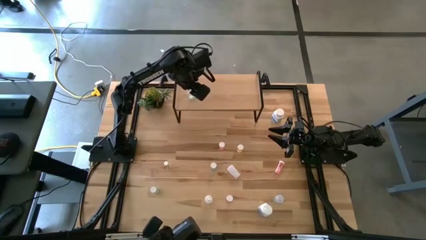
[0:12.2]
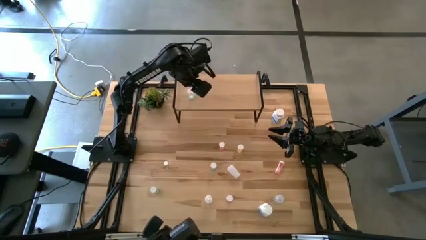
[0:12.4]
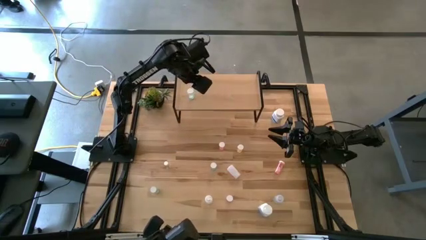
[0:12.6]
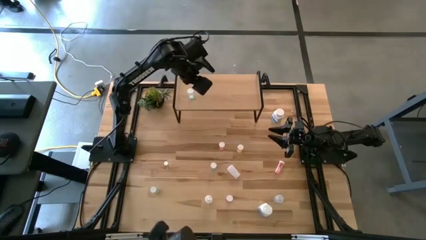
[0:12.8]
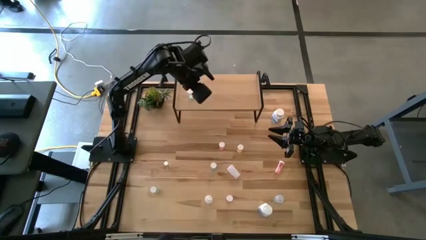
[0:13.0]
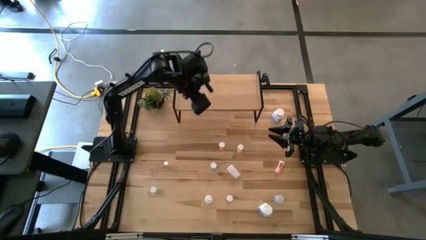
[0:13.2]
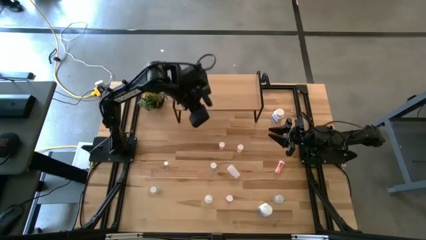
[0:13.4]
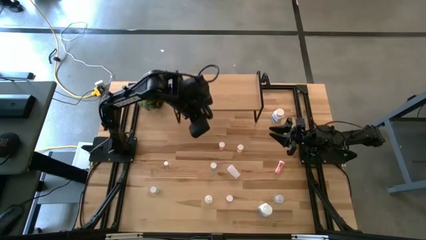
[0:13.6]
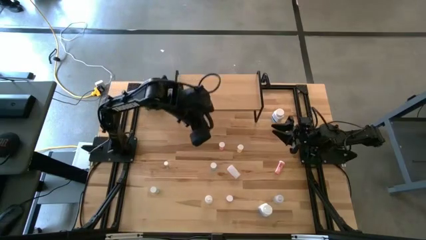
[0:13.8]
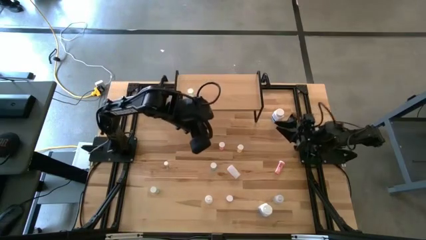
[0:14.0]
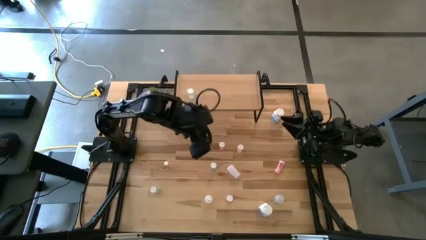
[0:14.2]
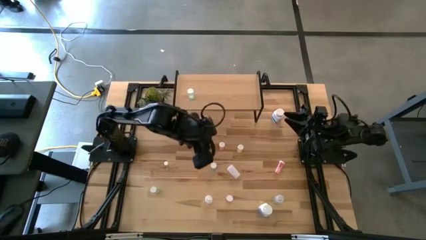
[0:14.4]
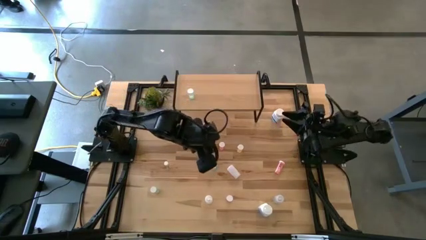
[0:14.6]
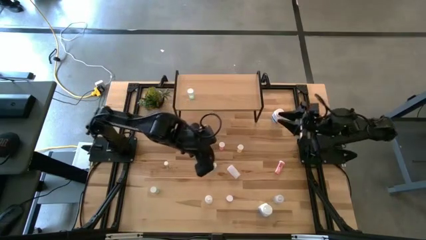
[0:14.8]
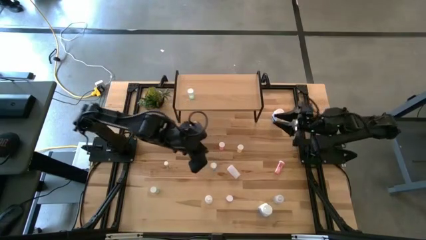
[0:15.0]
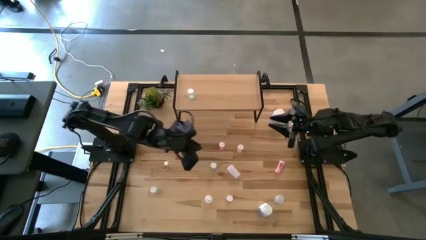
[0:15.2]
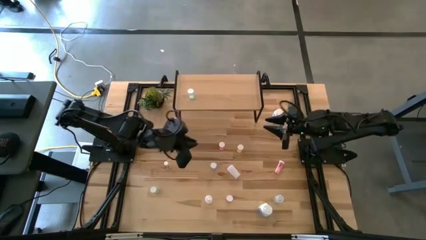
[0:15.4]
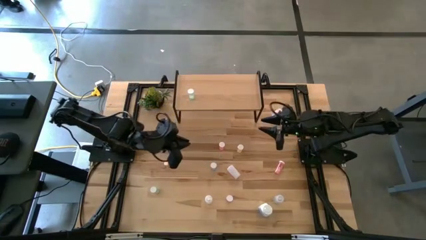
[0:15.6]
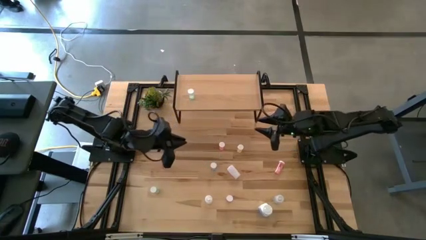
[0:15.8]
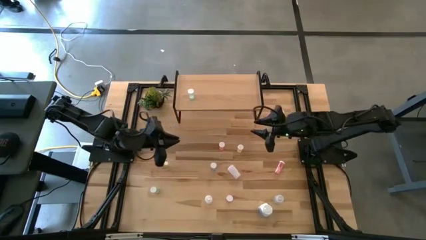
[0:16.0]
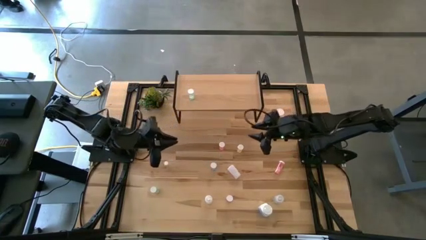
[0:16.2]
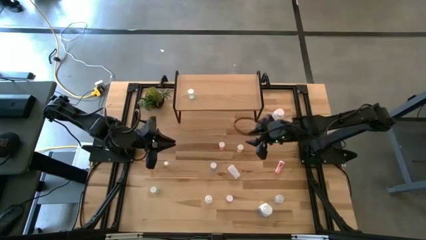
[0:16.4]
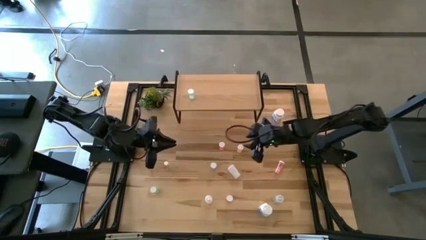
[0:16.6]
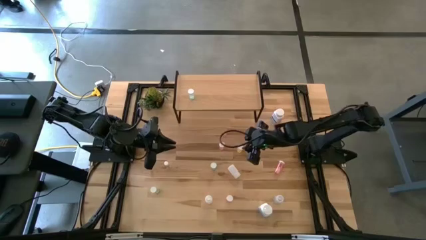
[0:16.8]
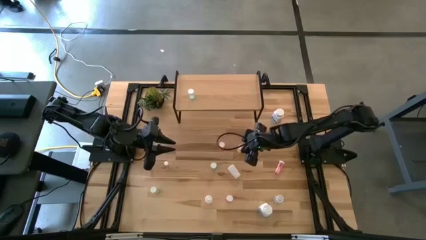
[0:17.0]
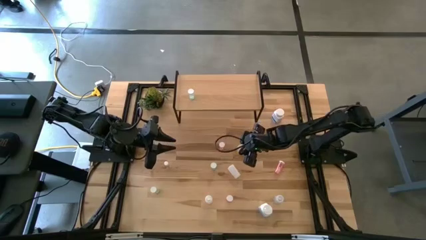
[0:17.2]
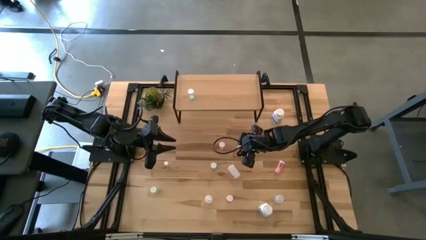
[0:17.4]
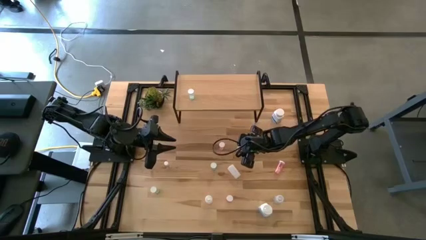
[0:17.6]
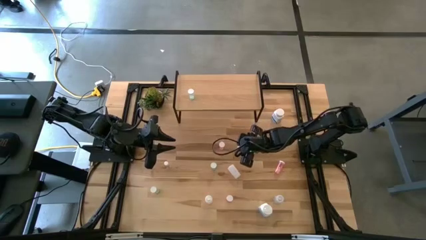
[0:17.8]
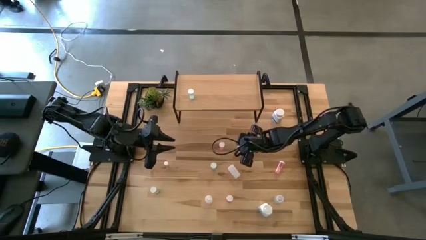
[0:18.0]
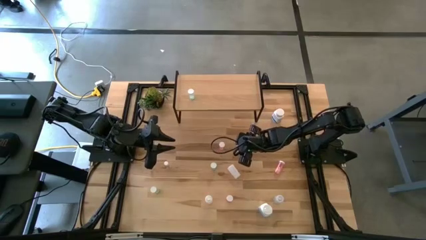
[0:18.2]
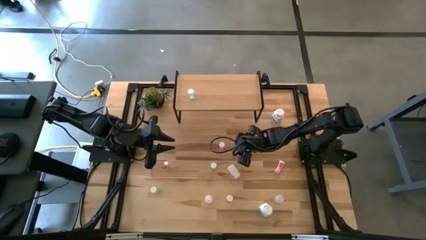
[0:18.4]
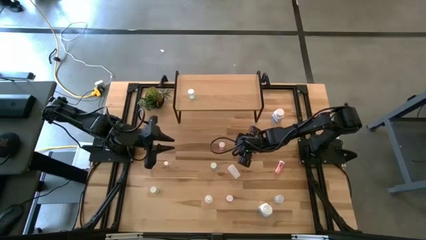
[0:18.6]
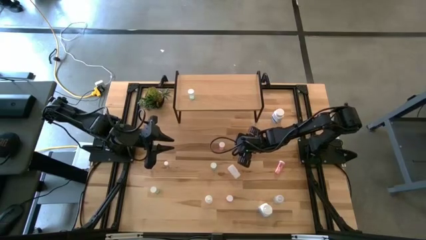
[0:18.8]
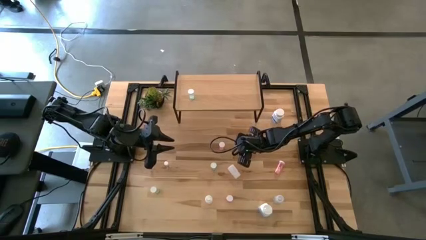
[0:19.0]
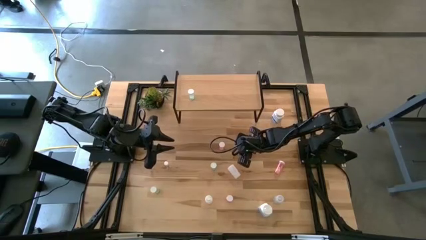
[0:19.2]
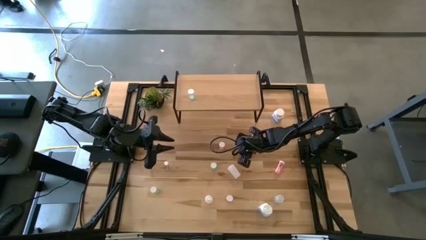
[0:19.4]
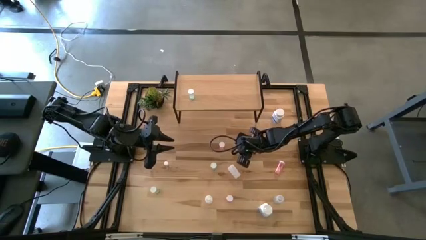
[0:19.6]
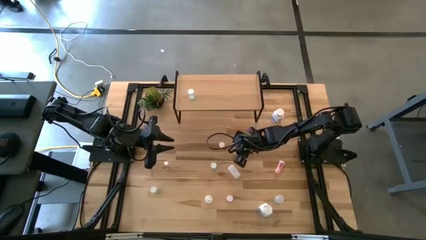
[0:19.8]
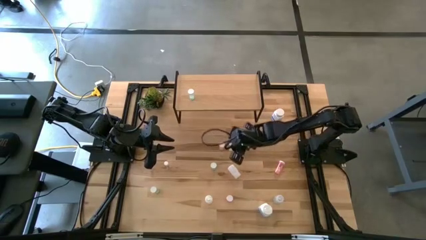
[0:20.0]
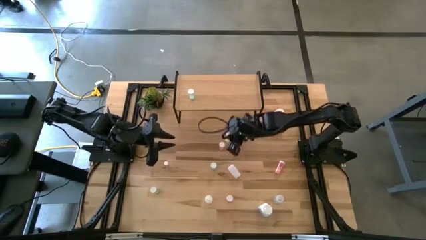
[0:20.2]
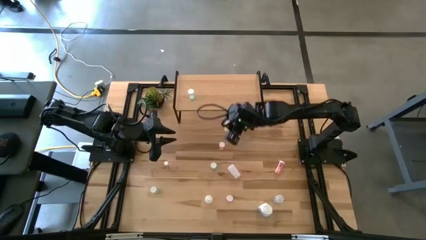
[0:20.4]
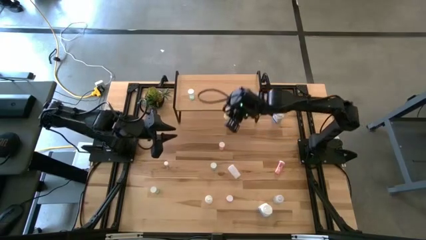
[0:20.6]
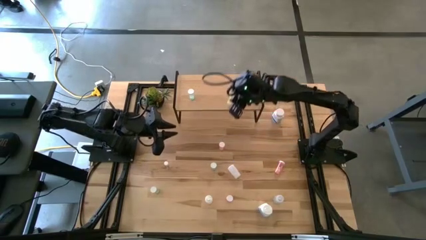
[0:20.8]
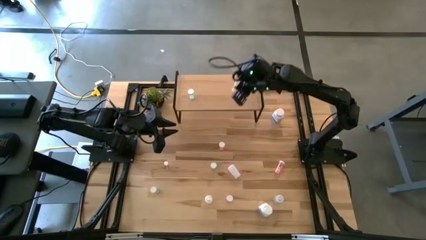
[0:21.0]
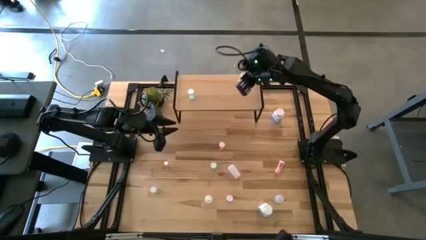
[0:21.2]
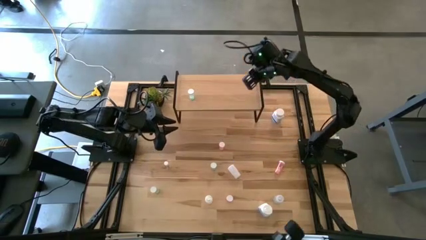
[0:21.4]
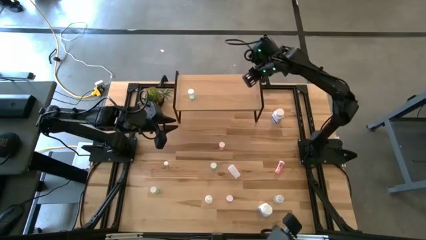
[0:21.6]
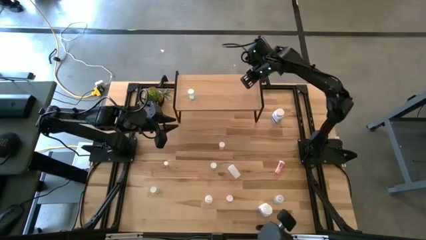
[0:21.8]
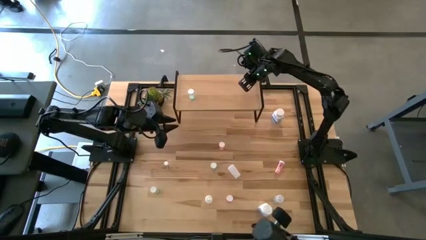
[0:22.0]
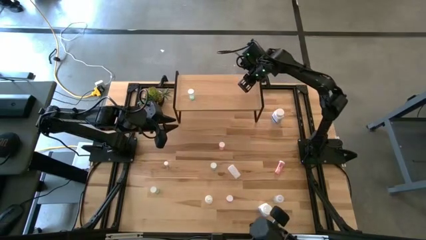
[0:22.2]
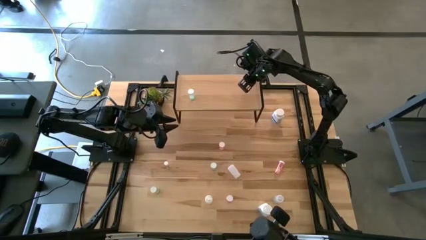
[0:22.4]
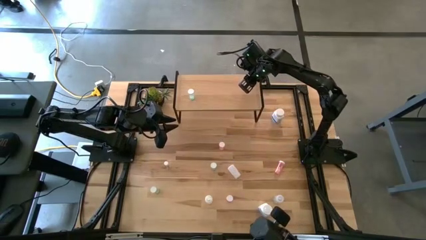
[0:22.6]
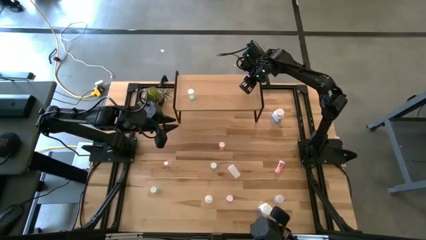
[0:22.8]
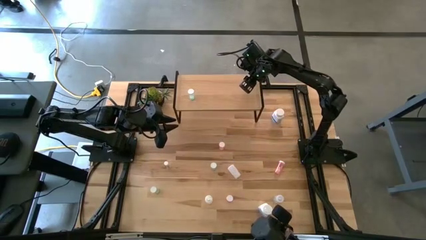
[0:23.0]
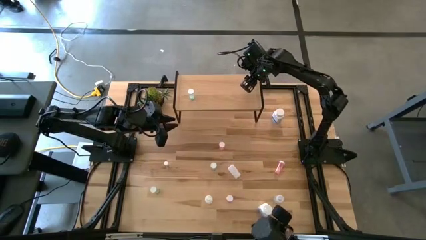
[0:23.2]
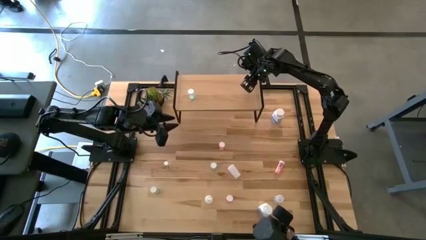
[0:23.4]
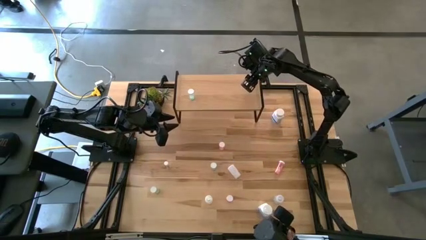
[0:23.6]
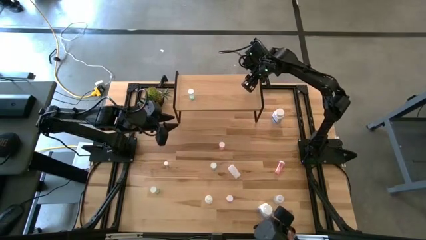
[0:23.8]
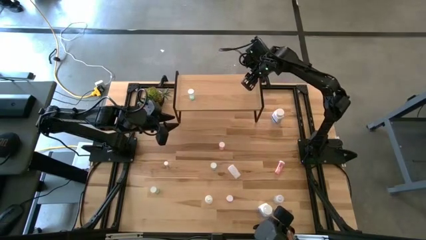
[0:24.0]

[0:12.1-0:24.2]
Task: Pick and place medicine bottles onto shelf by color
Put the yellow pill bottle on the shelf

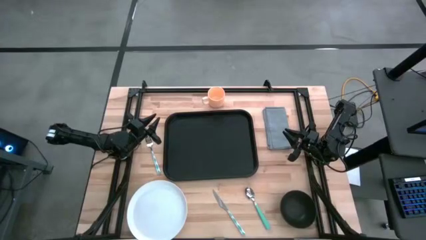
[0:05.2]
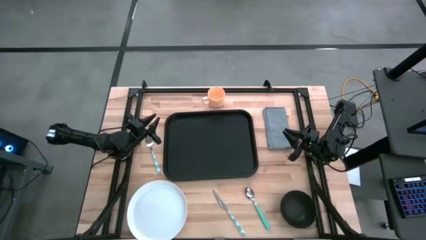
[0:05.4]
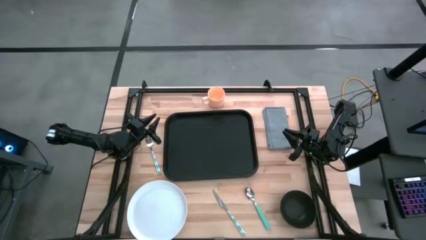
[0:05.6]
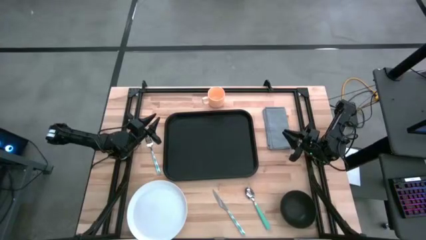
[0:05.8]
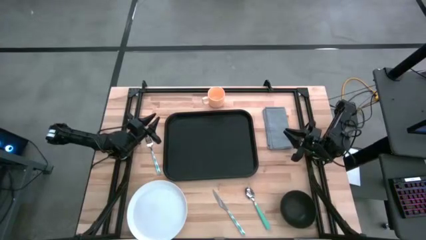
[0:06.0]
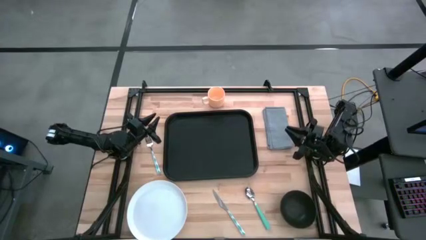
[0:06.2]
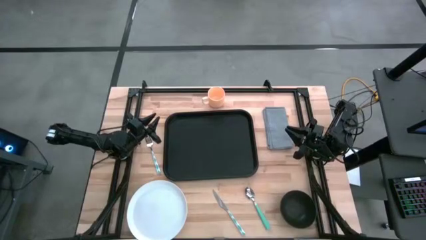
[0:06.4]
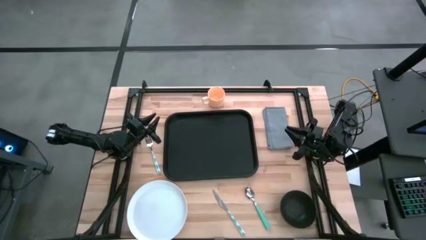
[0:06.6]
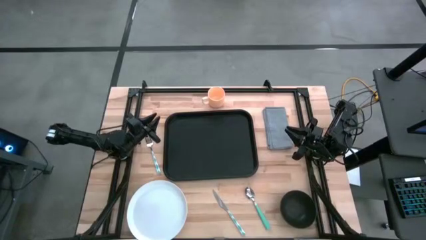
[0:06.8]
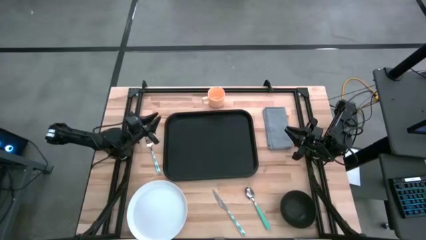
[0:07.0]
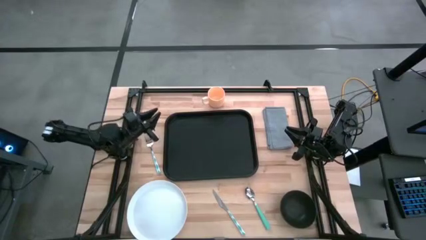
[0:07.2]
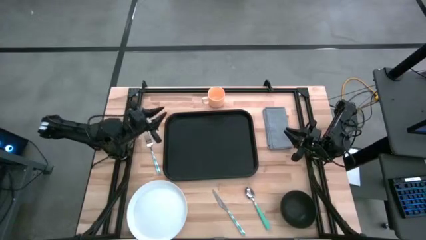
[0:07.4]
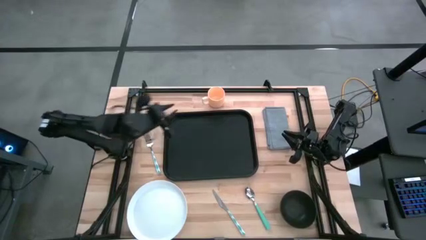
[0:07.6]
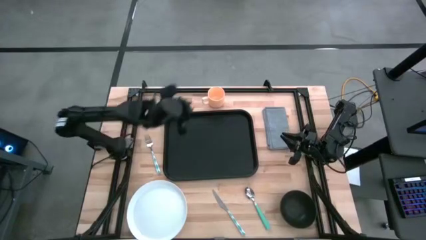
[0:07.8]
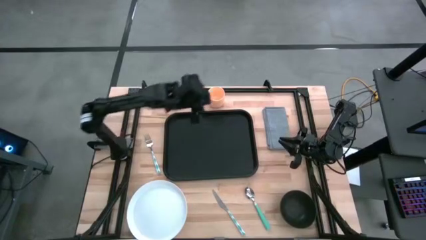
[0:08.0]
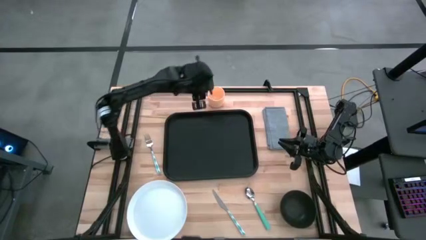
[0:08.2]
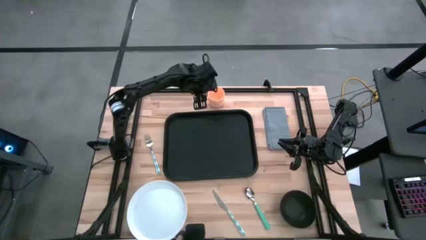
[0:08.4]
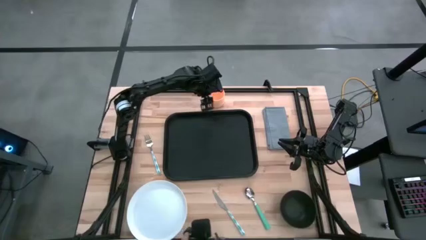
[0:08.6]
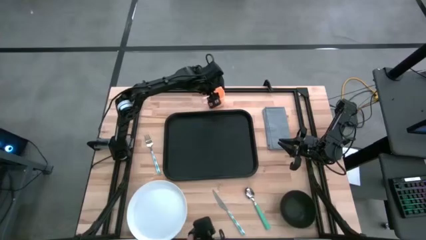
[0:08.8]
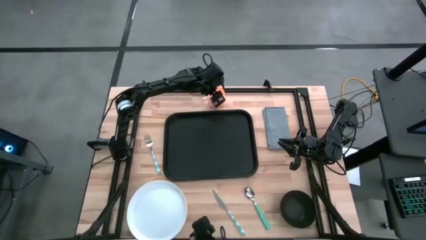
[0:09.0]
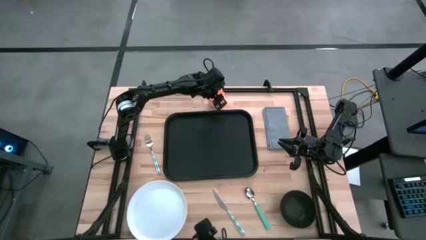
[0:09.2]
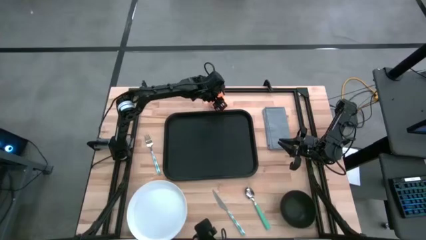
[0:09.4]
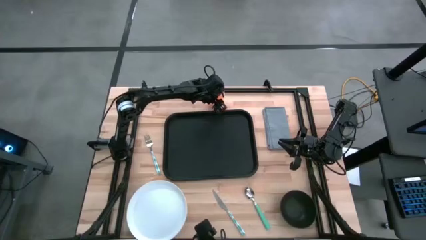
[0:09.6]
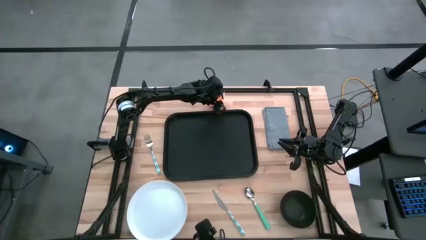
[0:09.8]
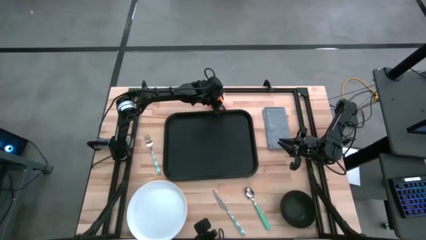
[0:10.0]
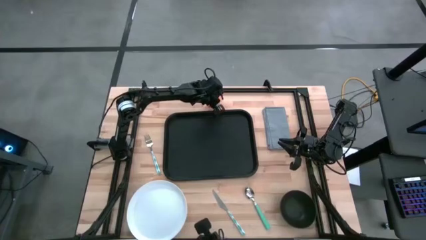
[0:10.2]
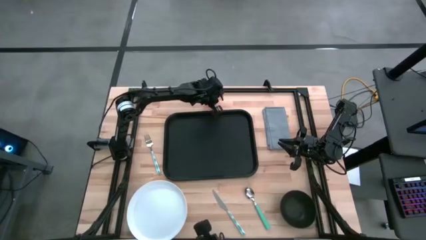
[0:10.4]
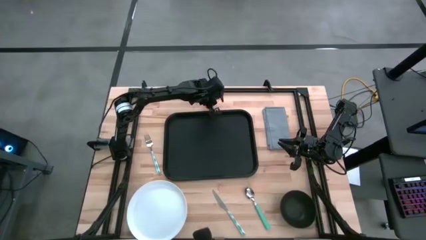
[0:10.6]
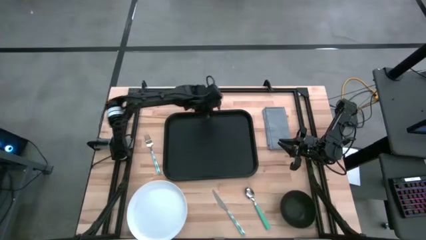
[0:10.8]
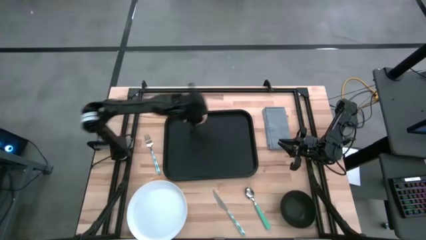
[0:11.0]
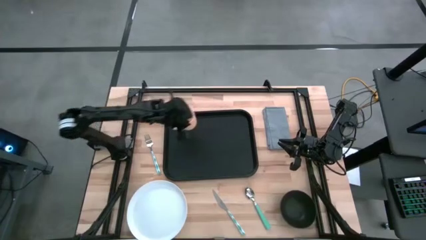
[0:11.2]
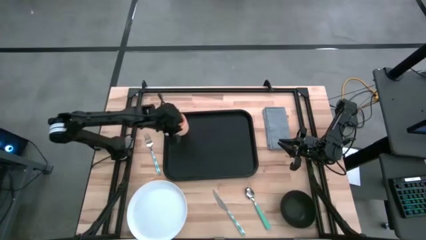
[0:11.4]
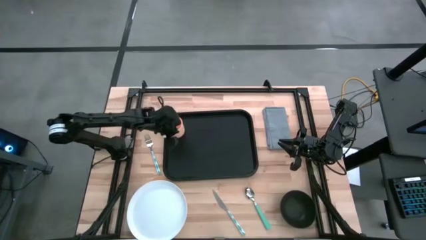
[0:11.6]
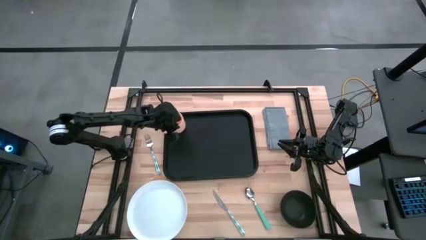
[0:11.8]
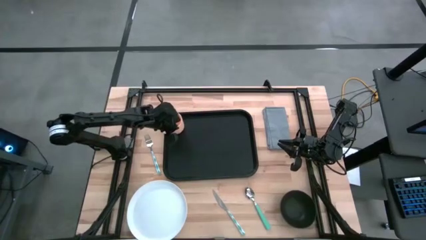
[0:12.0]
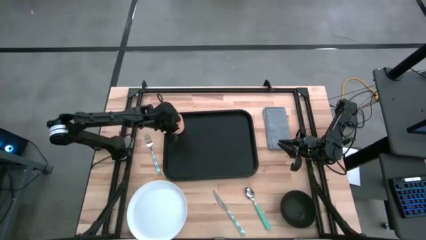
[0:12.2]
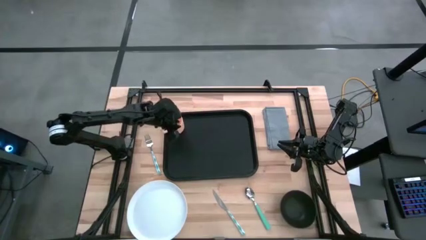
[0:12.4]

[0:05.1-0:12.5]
Task: Set up tray
Put the orange mug on the black tray
